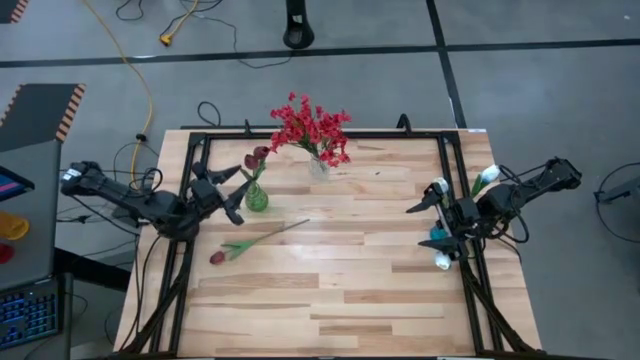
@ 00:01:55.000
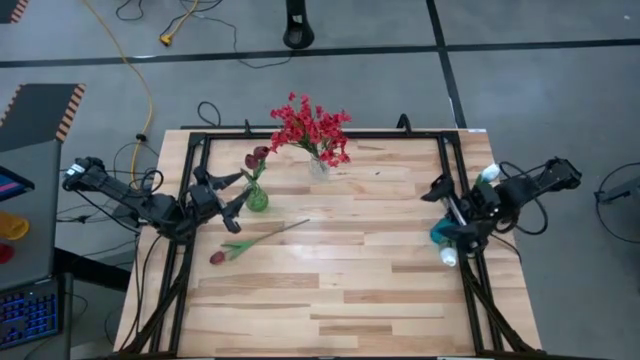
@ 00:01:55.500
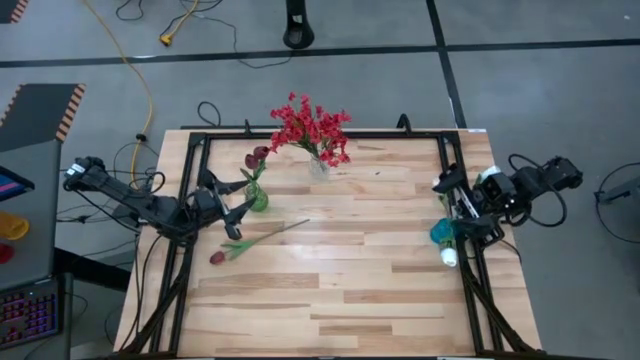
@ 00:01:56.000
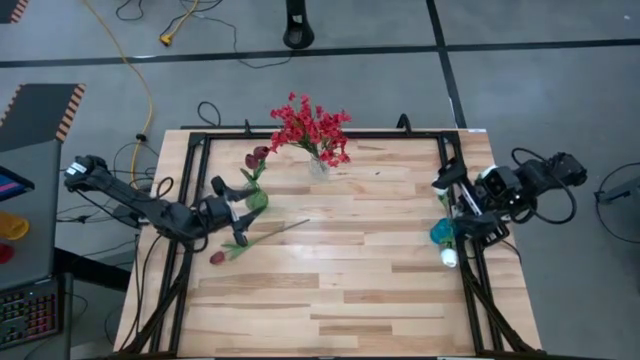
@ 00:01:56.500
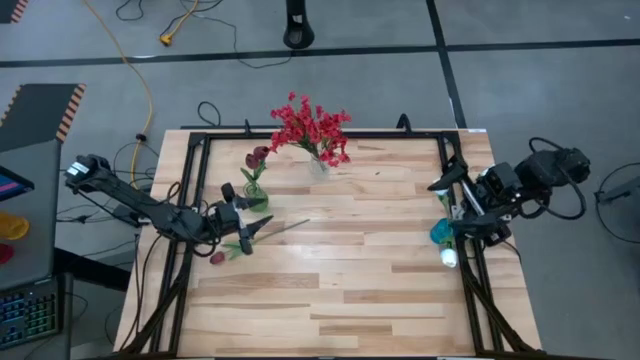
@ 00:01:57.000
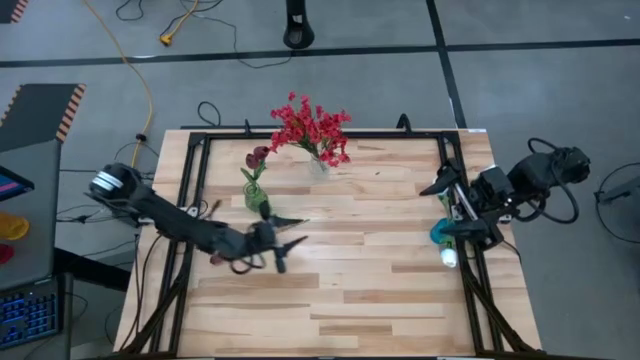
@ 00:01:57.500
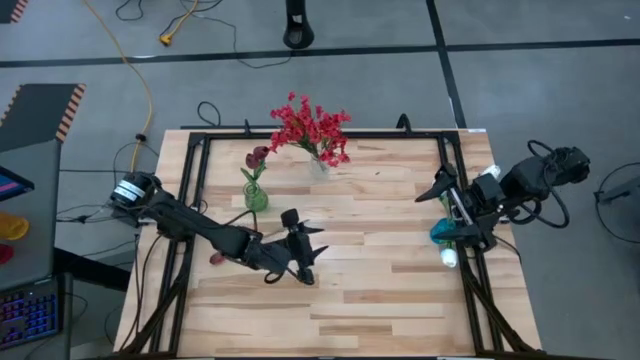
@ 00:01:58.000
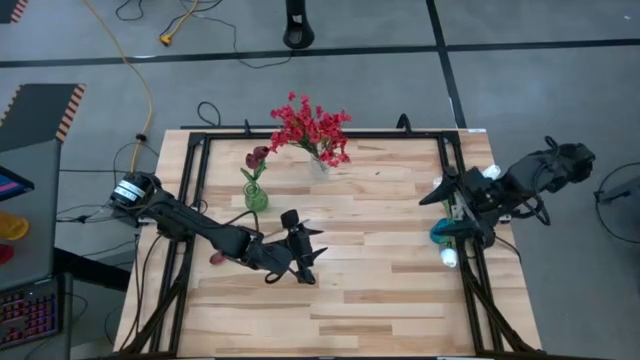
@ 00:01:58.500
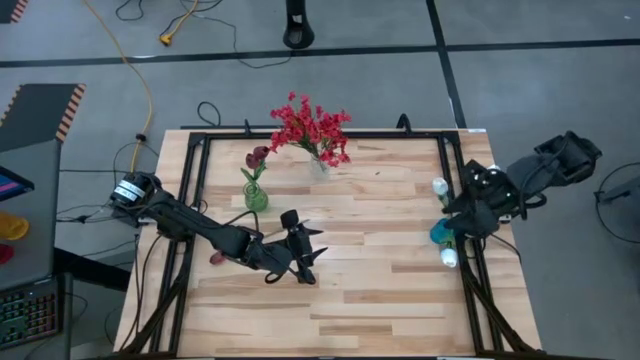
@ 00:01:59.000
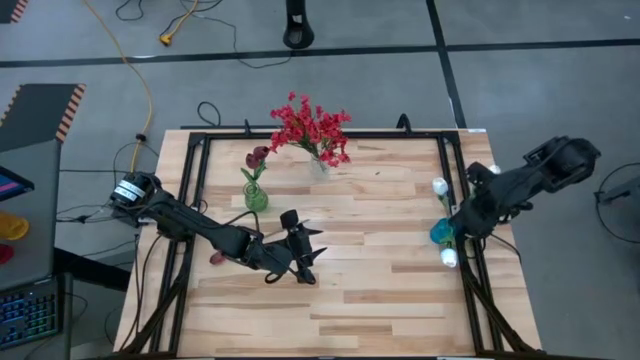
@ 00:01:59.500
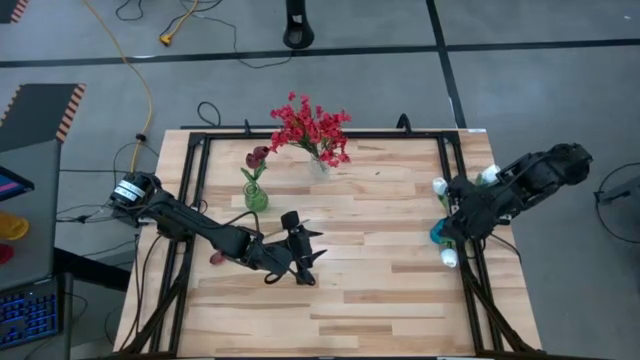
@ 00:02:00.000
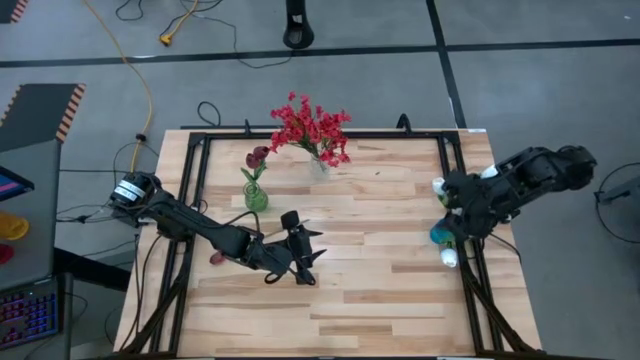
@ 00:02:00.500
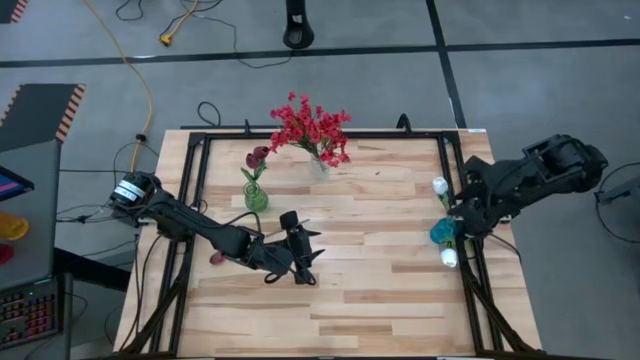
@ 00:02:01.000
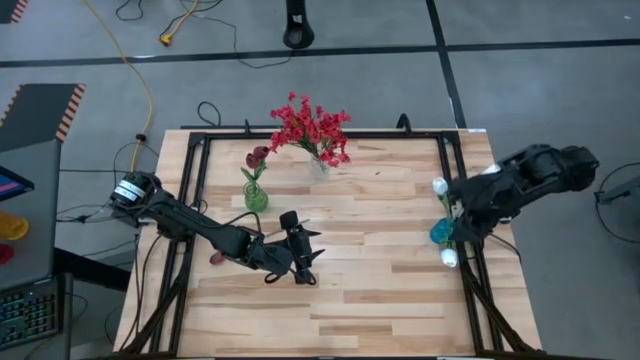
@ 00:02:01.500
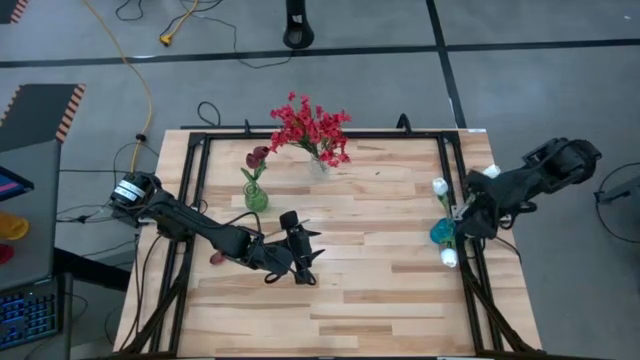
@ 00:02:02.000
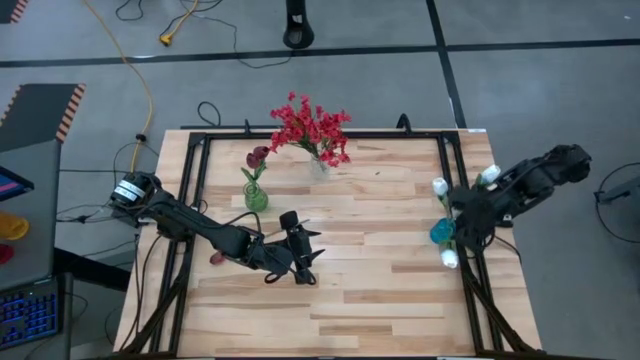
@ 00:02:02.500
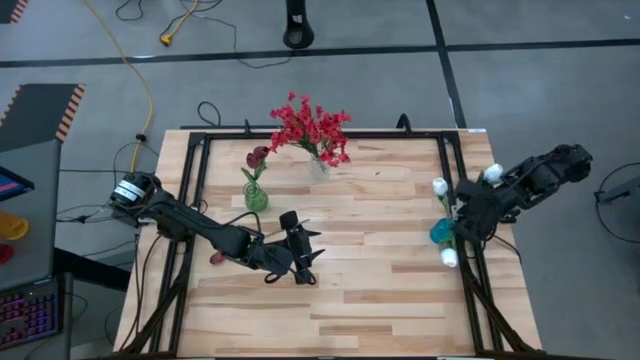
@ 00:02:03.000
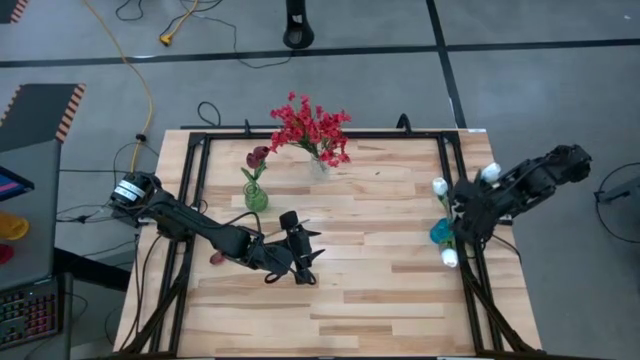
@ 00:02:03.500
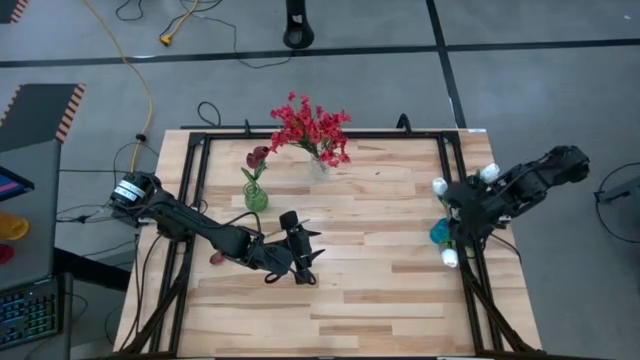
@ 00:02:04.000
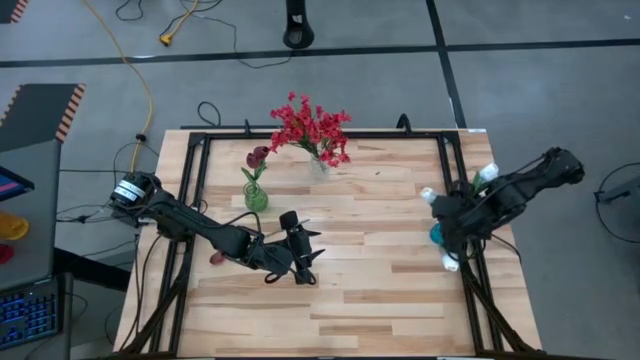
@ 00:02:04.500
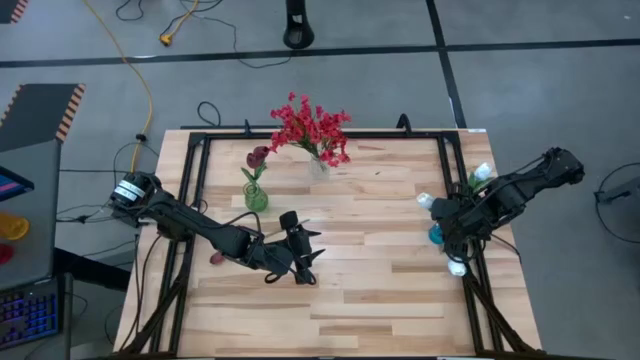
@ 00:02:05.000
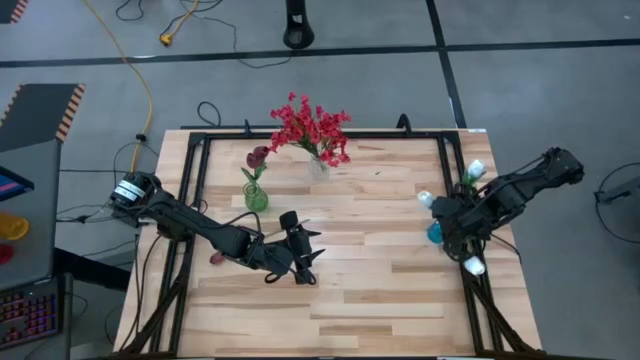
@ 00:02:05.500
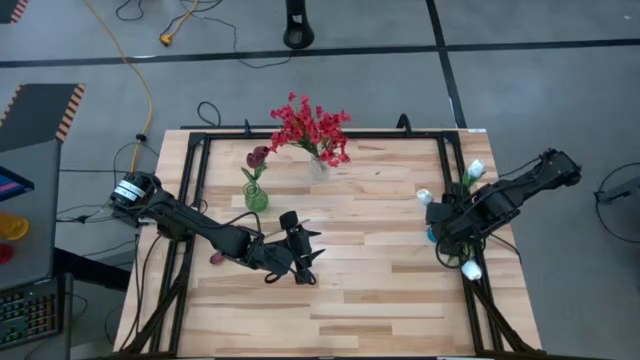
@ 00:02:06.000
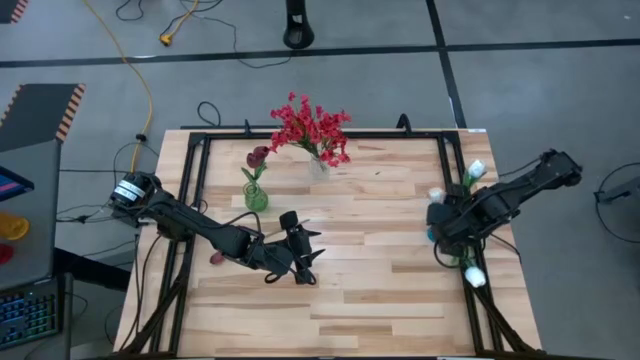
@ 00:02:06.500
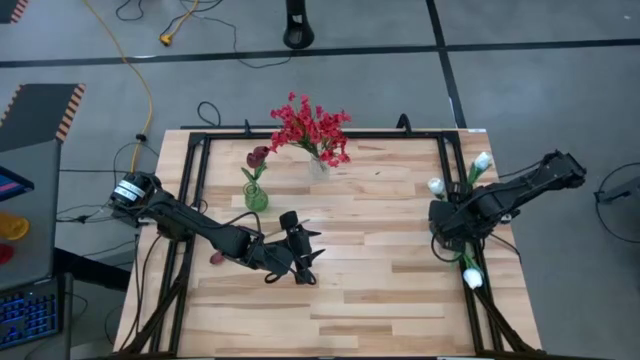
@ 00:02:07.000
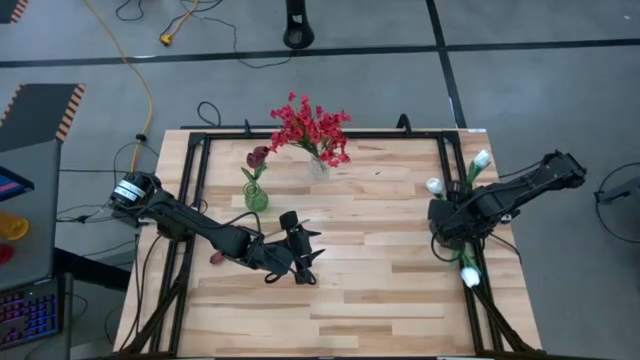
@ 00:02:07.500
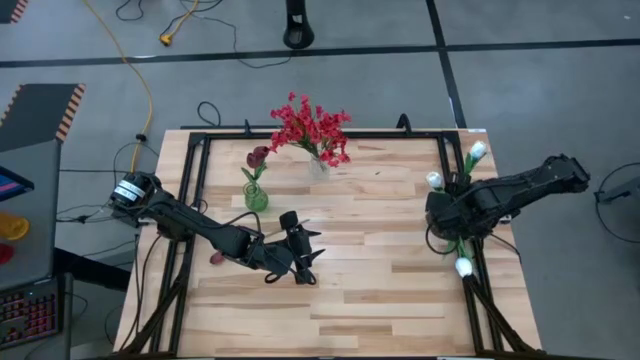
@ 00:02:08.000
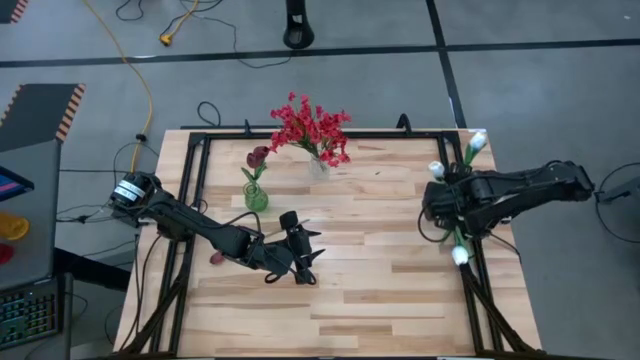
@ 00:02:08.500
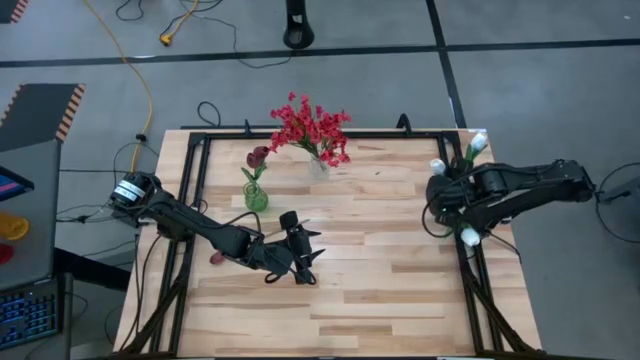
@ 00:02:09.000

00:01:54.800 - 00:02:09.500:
Task: Sort flowers into vase by color
Move the blue vase to the top of the table

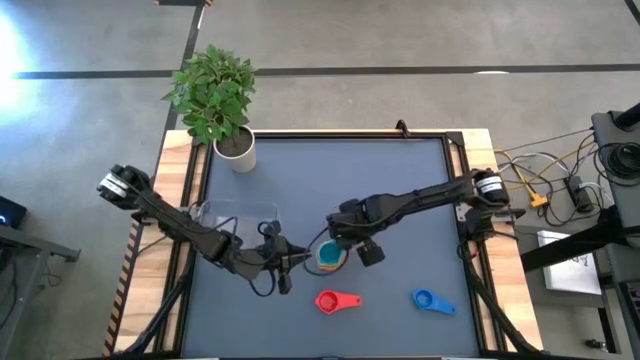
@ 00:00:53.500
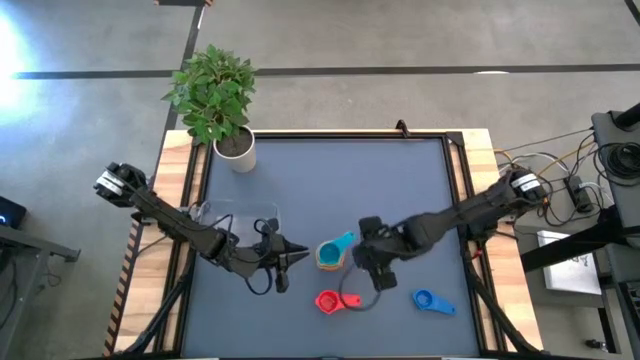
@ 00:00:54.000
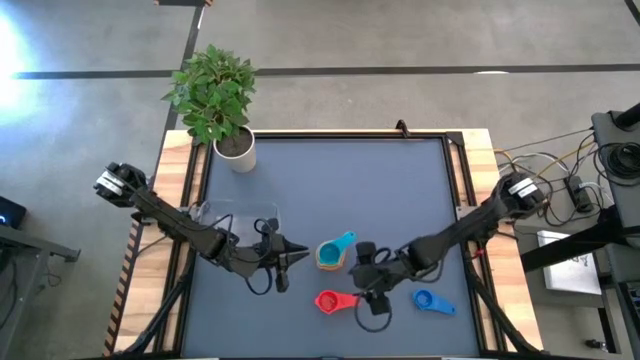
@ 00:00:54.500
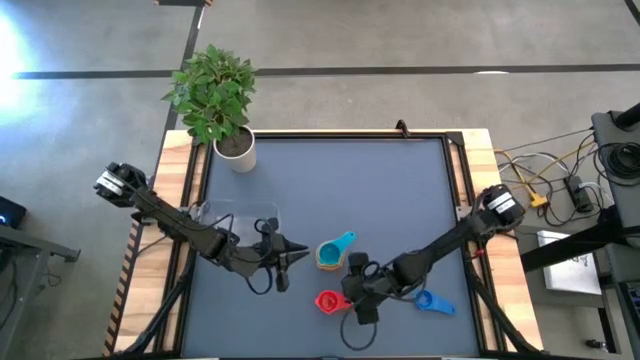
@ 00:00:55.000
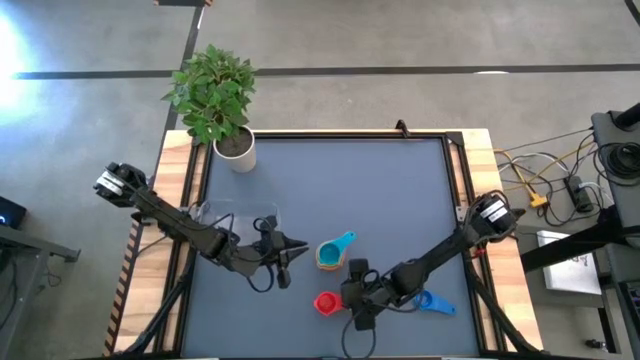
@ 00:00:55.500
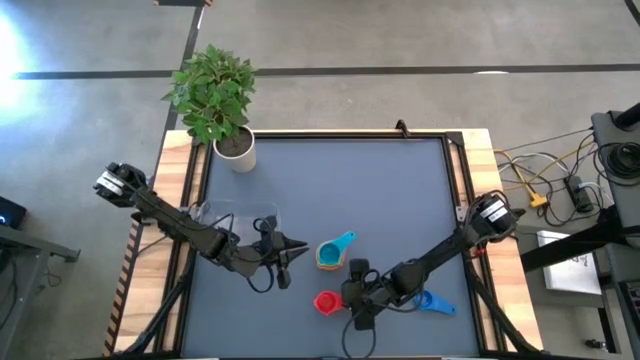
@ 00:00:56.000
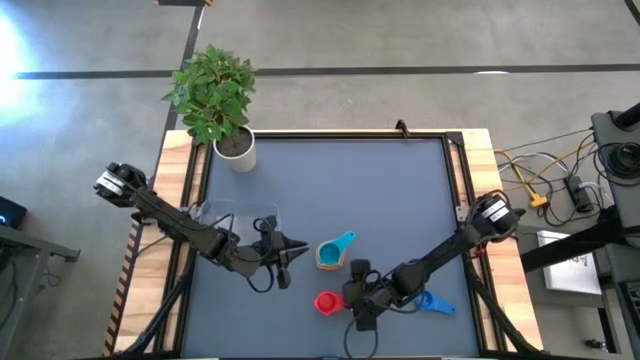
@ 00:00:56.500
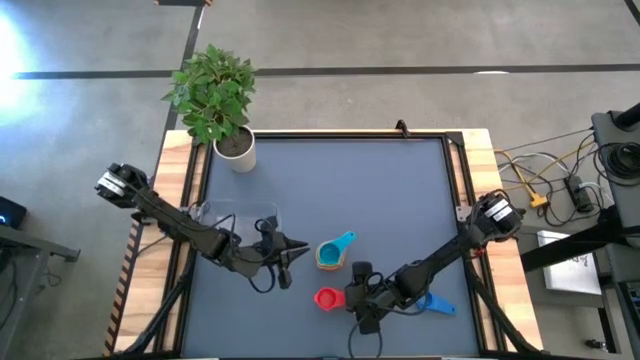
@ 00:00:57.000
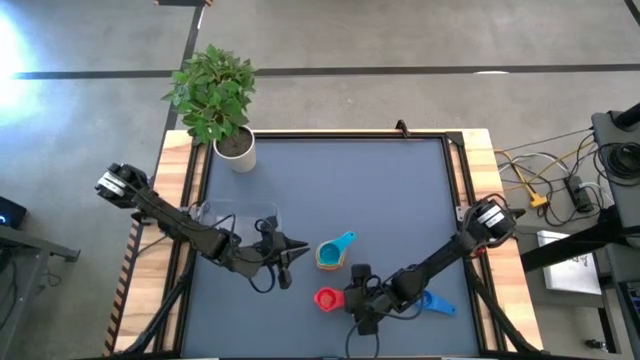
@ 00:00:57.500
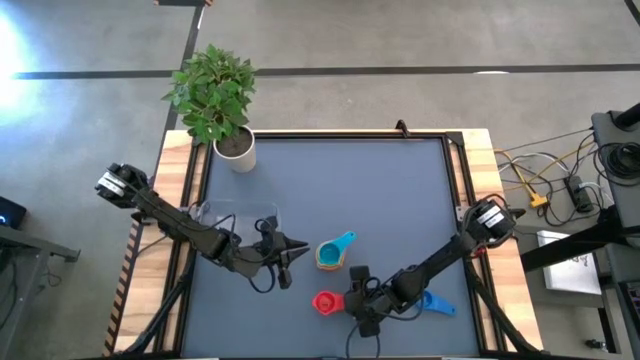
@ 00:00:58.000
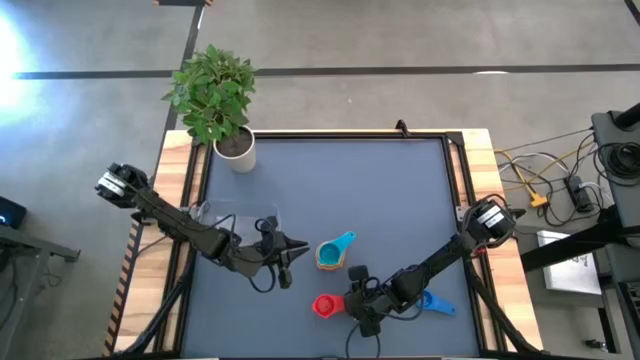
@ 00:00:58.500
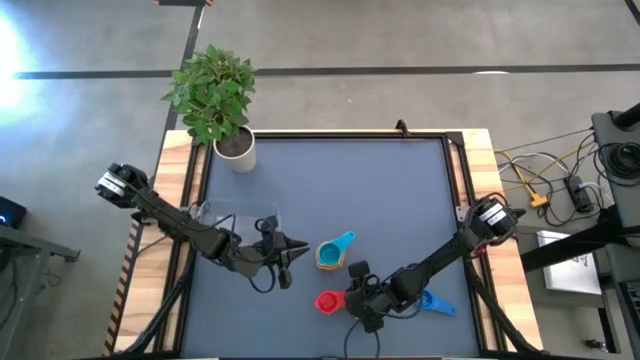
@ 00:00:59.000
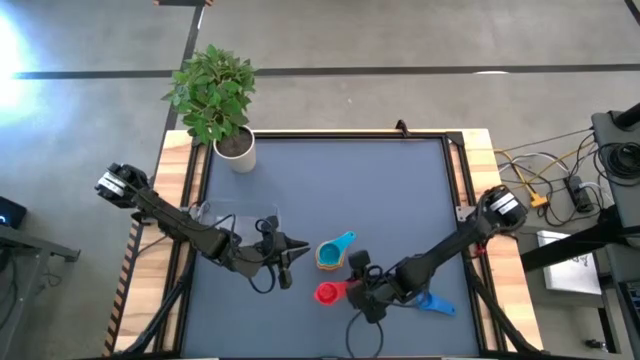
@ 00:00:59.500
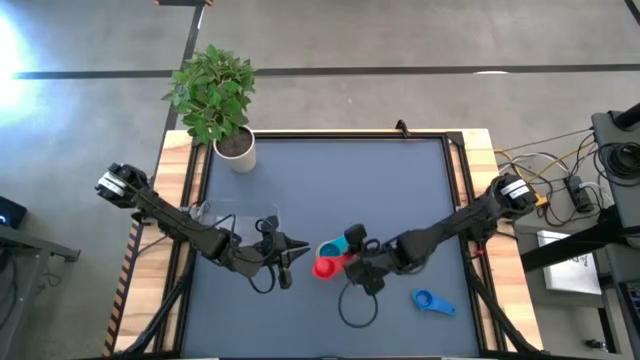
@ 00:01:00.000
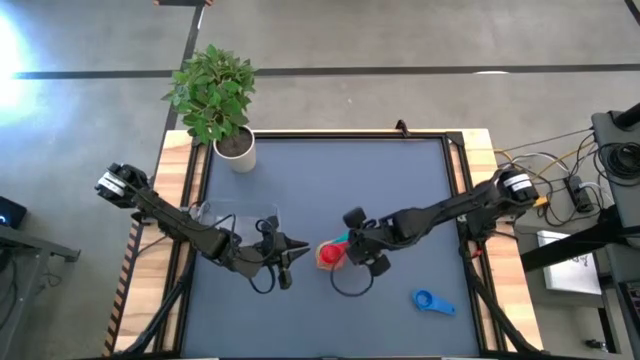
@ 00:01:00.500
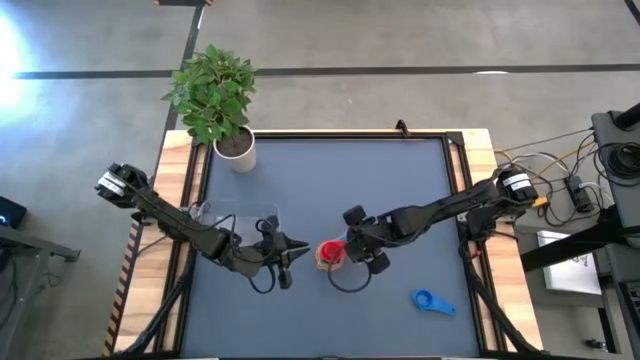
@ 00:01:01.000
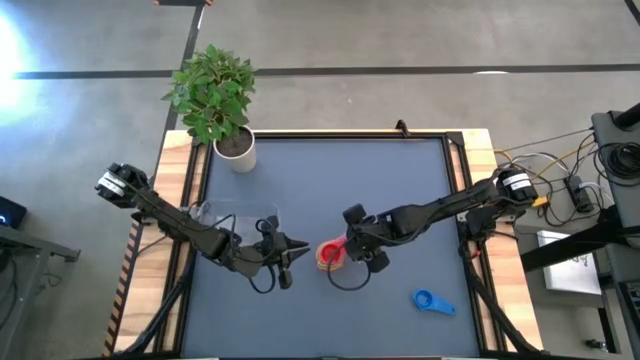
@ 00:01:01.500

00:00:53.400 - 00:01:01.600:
Task: Nest measuring cups in basket
Stack the orange measuring cup on top of the light blue measuring cup
